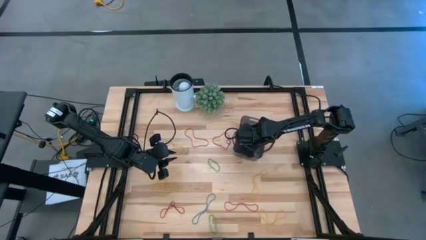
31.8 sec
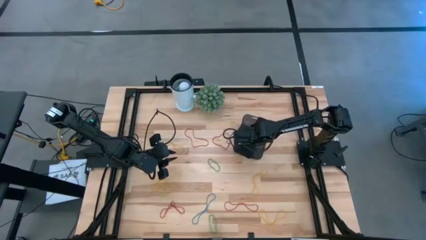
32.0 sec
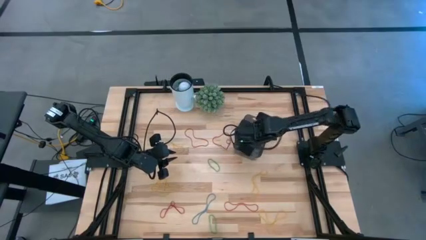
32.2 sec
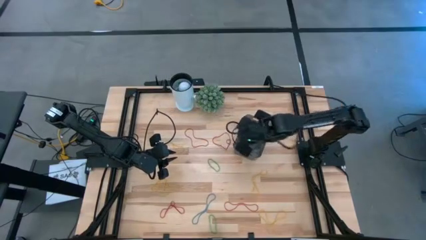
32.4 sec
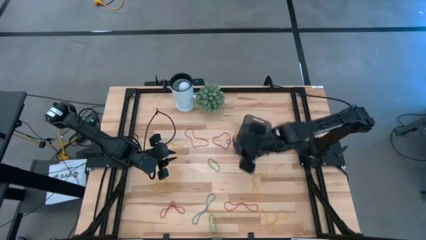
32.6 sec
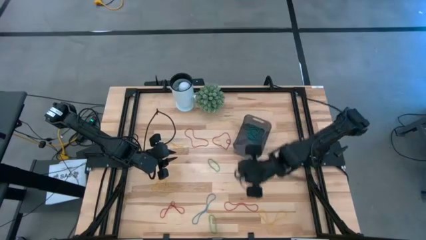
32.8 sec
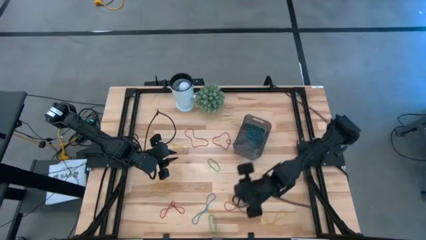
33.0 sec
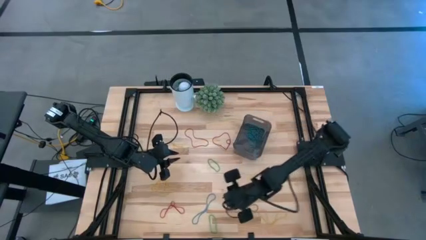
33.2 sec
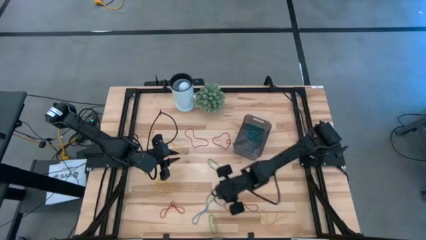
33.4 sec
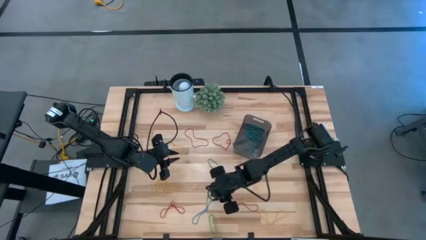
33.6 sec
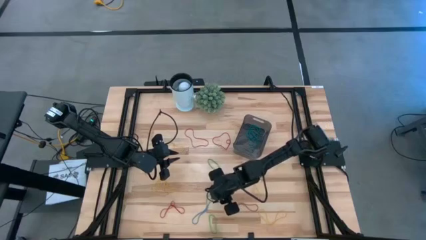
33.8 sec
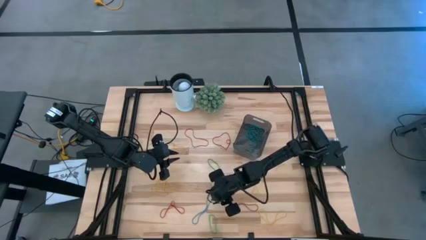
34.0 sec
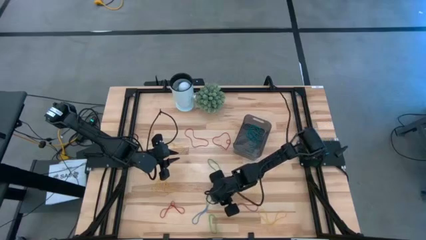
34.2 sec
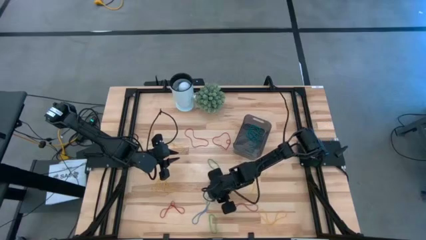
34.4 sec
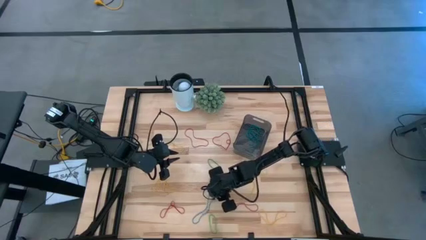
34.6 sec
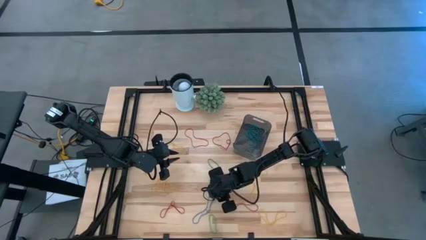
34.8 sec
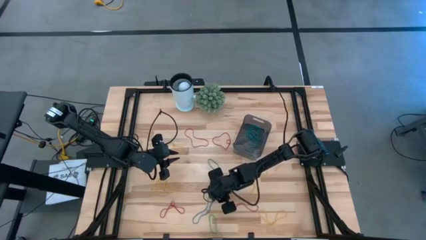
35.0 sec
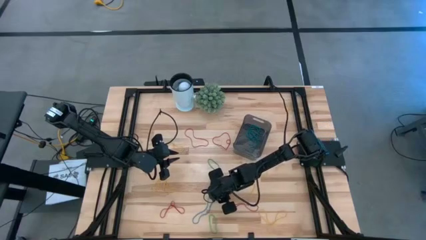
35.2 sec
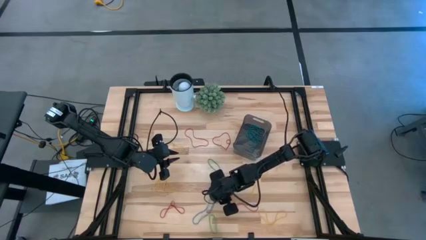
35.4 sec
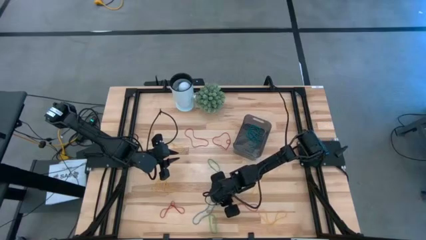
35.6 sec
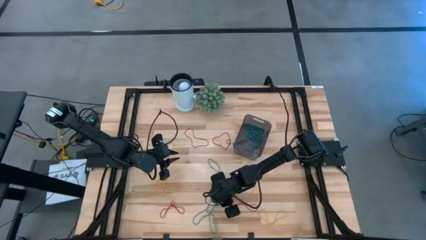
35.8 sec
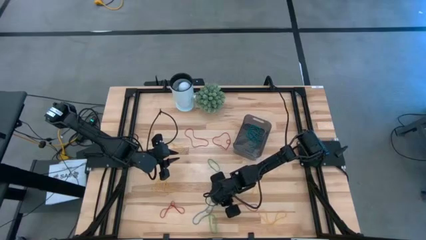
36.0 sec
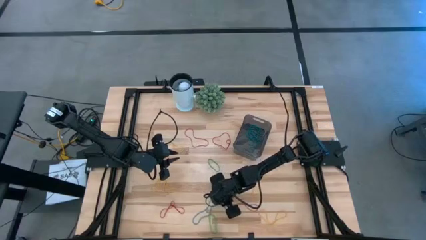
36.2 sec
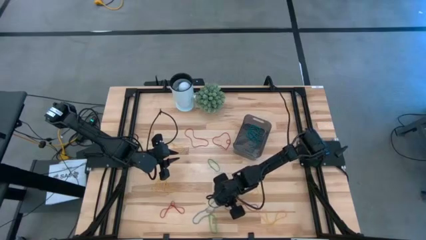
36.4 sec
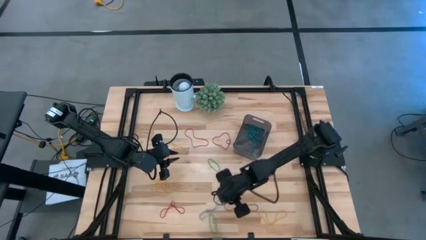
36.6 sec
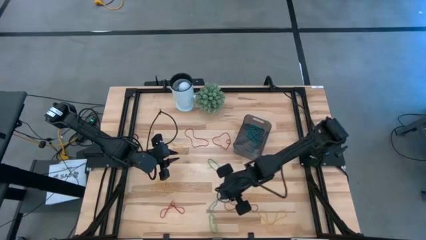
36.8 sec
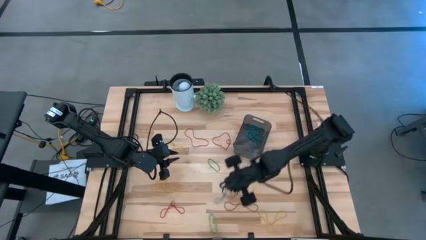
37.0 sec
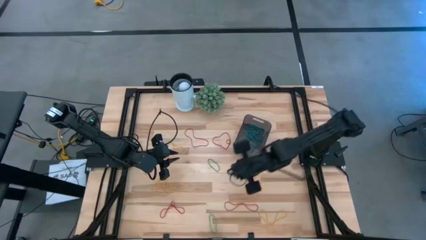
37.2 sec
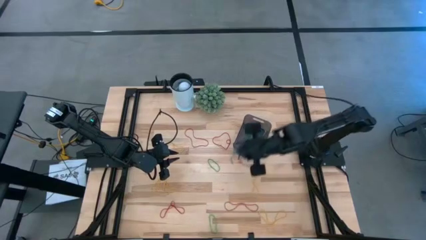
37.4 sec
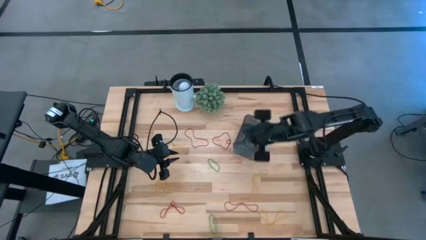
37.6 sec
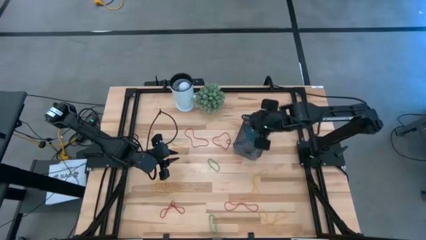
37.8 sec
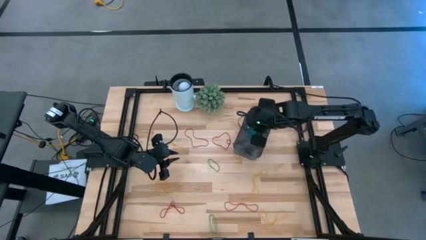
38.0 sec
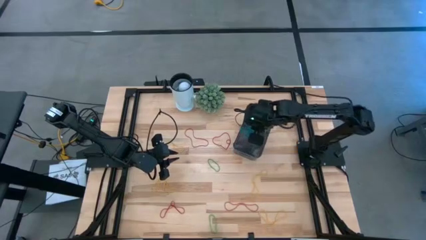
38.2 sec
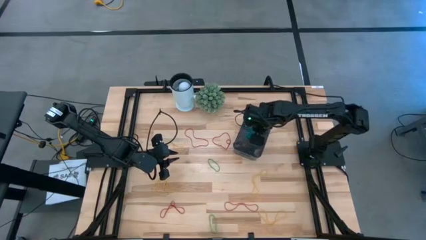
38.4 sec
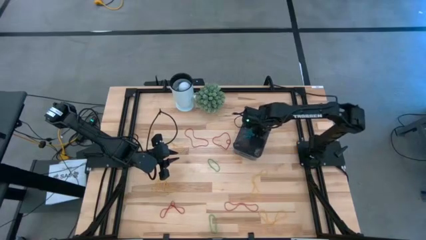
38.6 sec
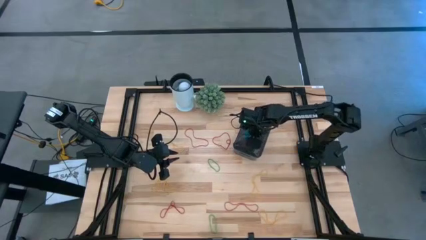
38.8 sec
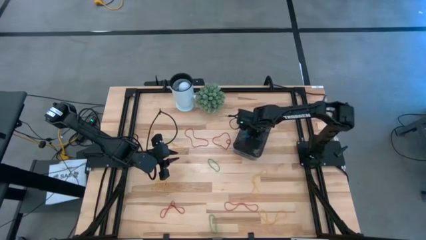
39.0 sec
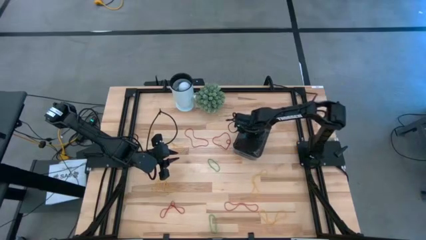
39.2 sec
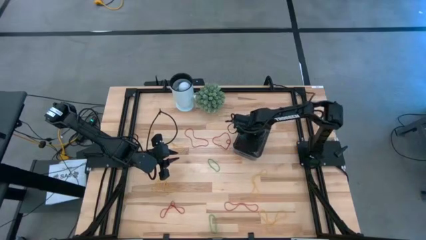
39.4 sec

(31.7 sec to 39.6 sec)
Task: Pick and place items into bin
Put the blue rubber band into the black bin

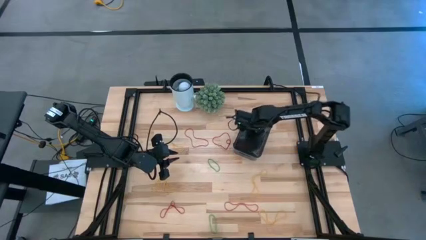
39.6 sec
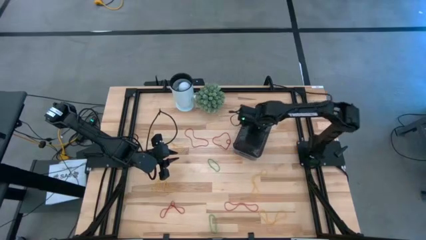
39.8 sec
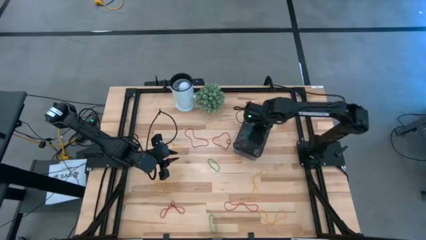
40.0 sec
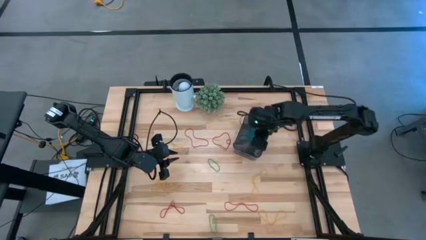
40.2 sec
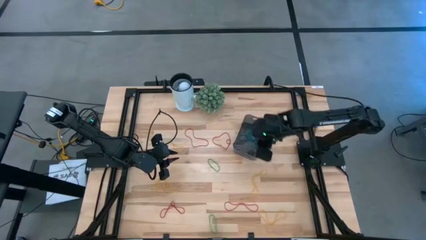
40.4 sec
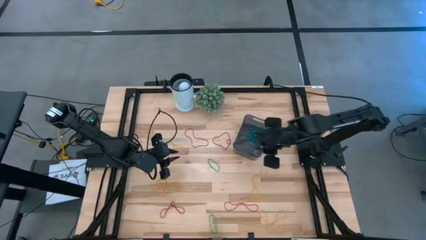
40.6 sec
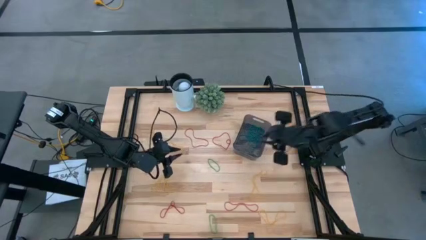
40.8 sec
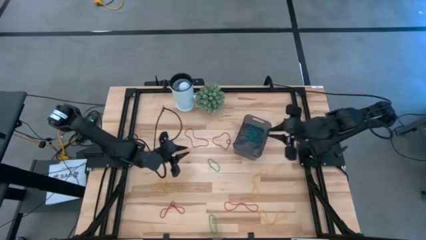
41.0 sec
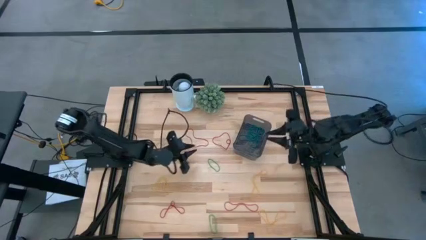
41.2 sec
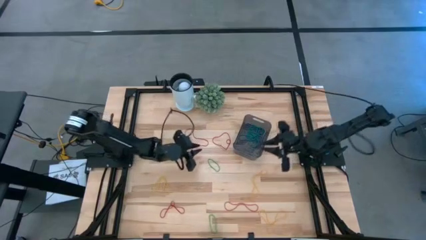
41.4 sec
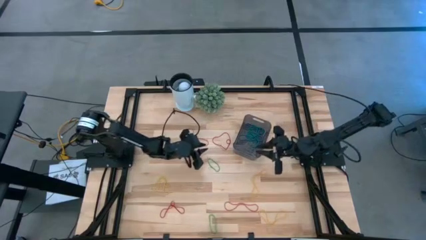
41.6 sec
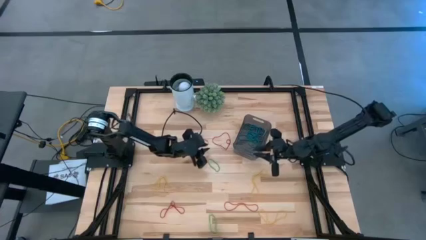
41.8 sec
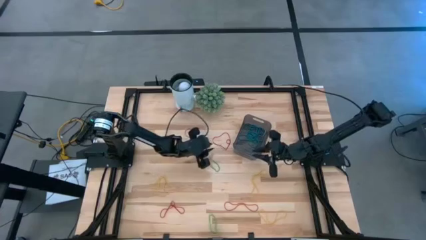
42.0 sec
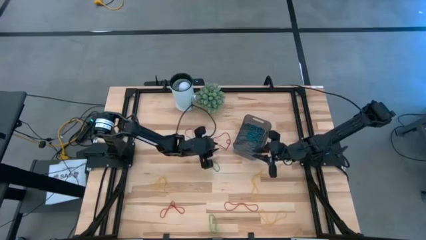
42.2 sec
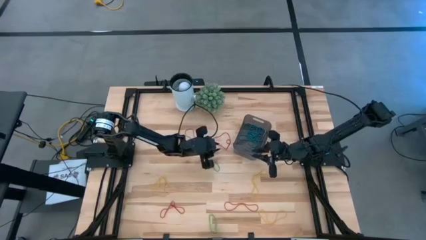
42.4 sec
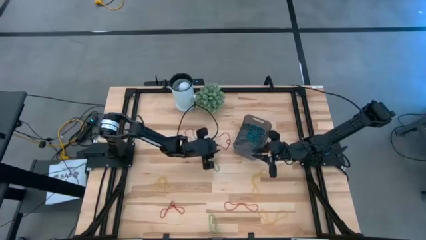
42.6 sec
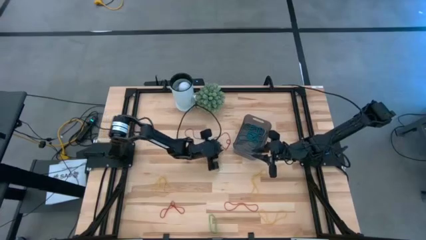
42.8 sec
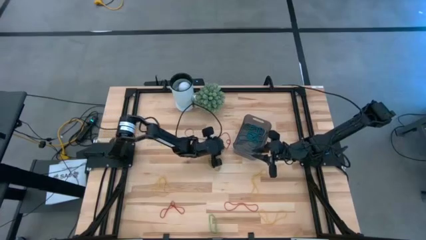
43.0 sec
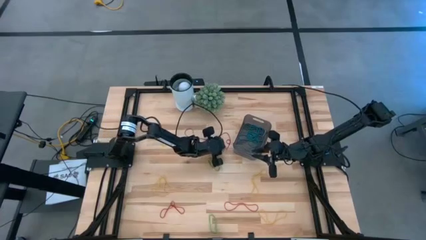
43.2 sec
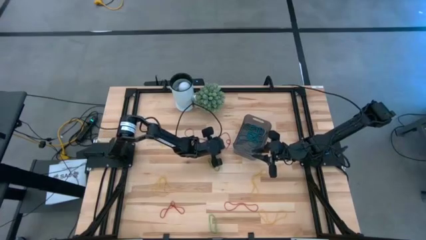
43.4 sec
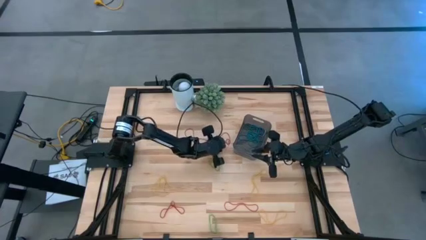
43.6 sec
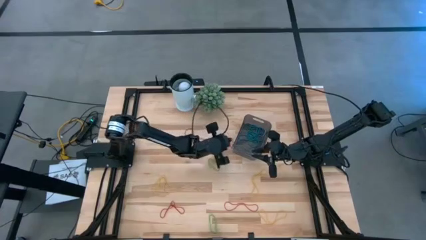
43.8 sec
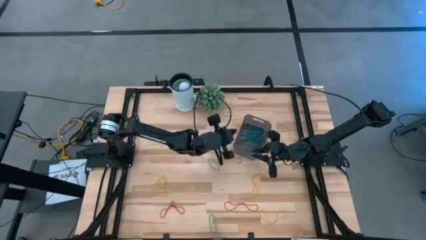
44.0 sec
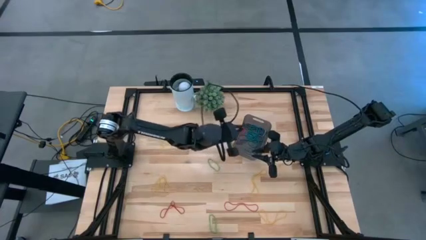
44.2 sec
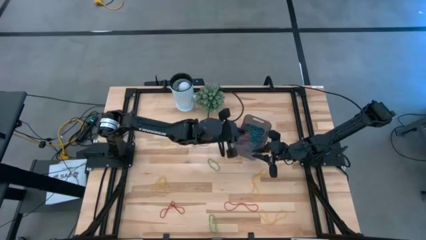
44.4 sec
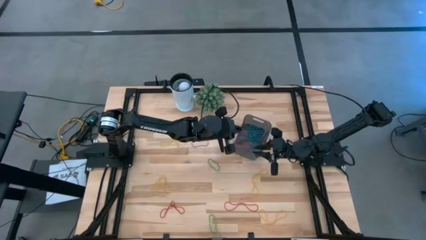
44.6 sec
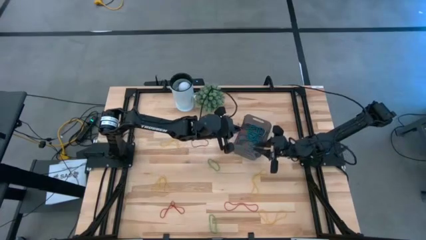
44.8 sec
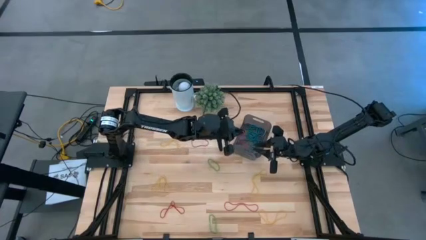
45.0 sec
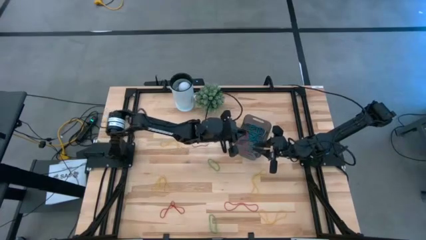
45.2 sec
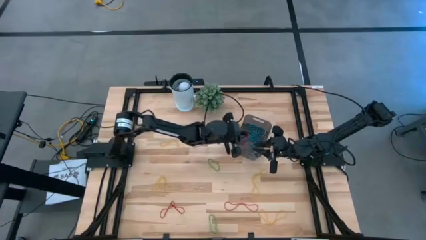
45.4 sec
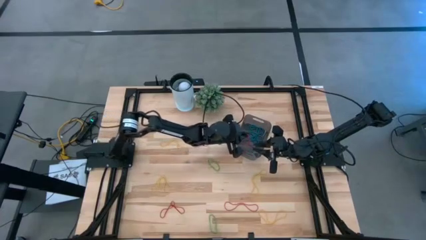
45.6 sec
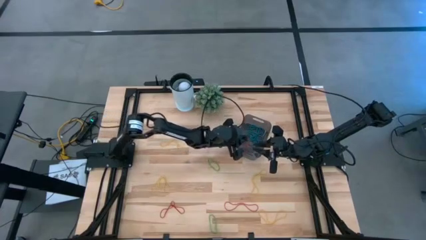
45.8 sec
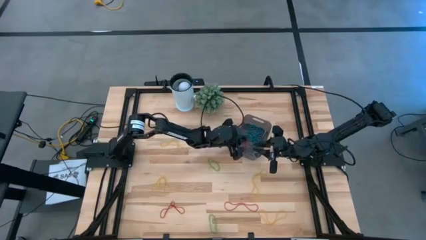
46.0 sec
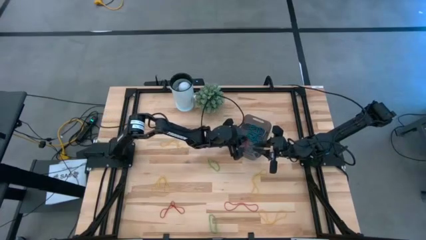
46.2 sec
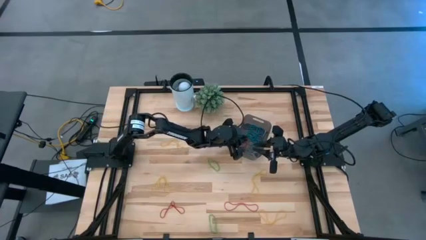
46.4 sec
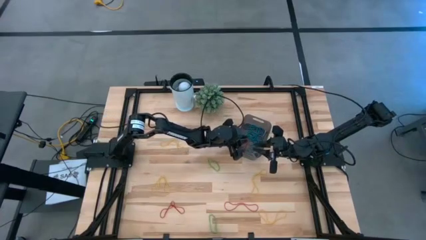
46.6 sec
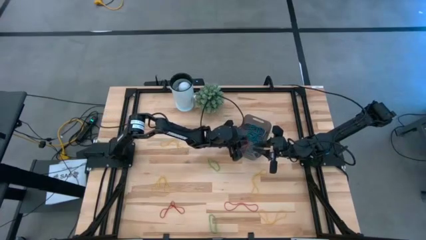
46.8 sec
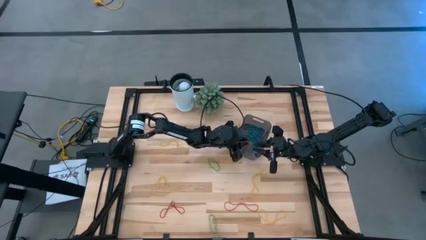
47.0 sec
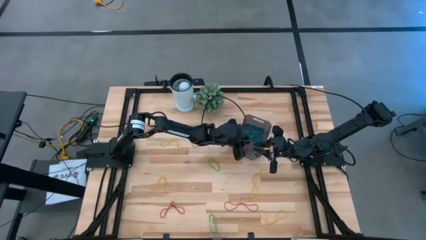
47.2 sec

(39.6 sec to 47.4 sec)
Put the red rubber band into the black bin

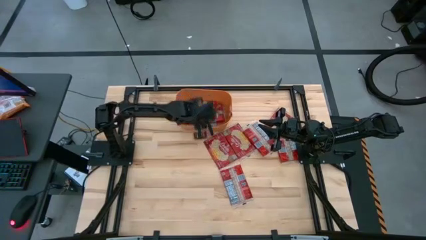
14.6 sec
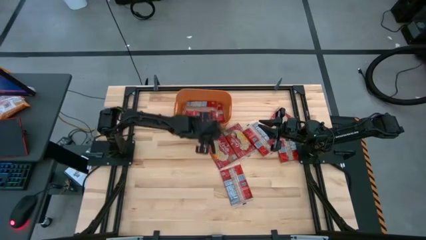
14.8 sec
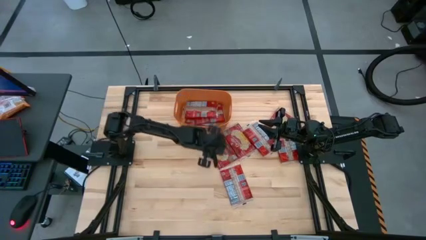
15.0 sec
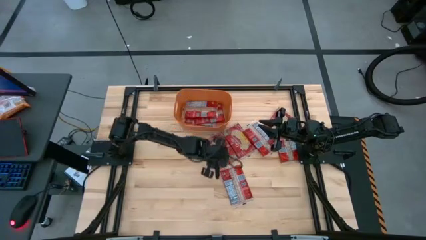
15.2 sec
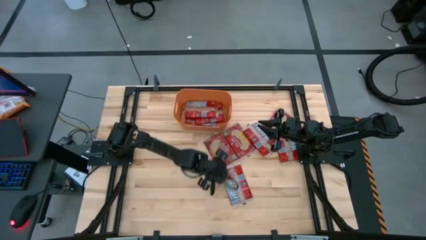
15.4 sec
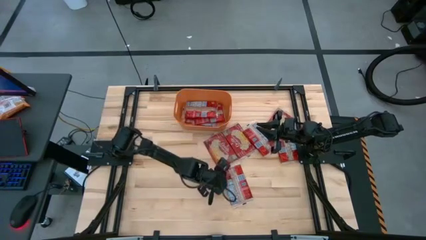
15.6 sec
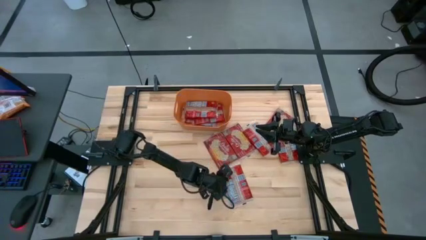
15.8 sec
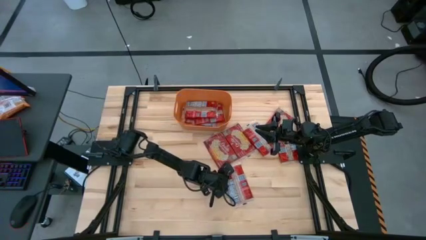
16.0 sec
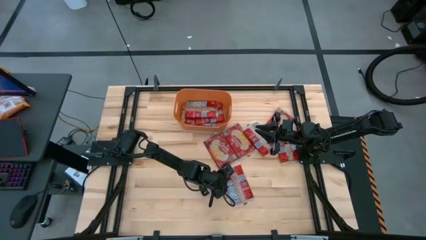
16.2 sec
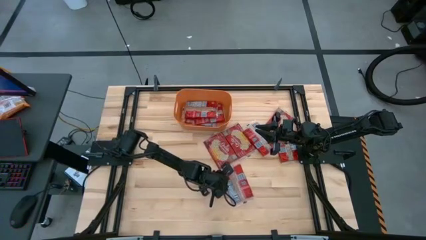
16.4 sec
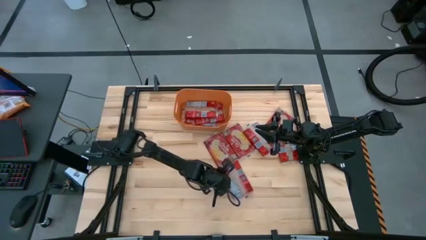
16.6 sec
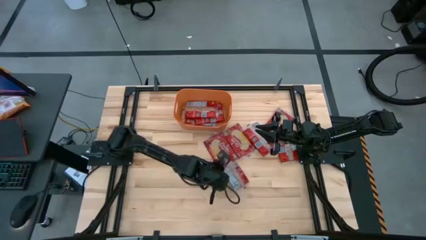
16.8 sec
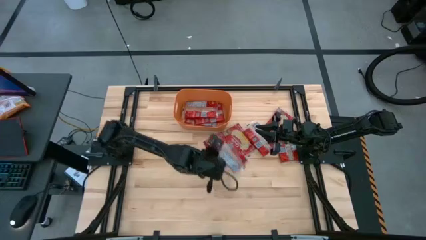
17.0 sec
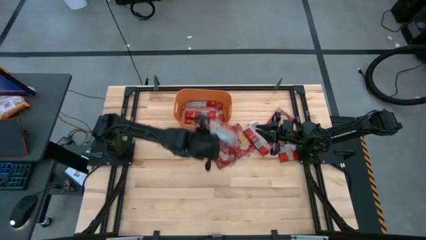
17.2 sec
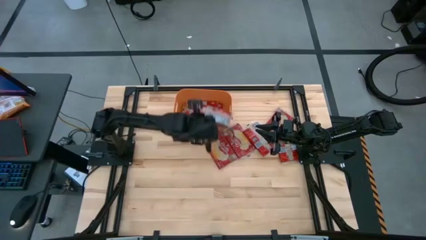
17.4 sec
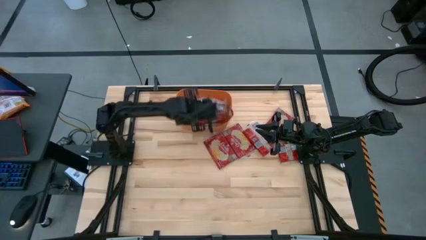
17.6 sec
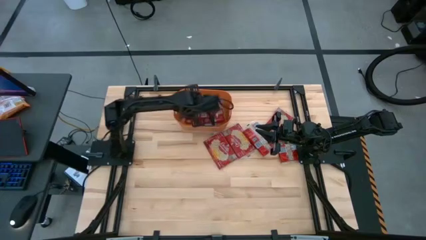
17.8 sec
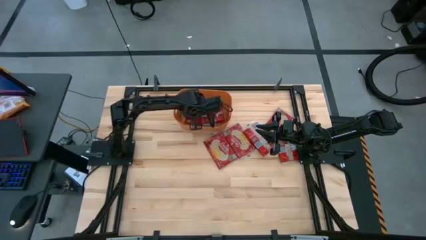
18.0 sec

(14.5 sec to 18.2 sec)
Task: Sort popcorn bags into baskets
Put the red popcorn bag into the orange bin
